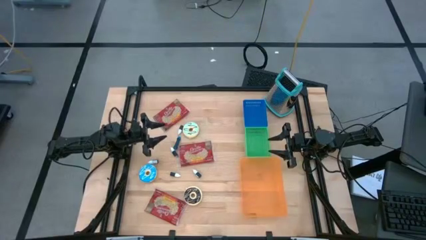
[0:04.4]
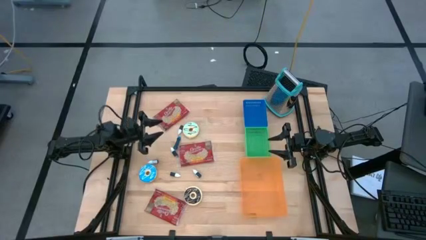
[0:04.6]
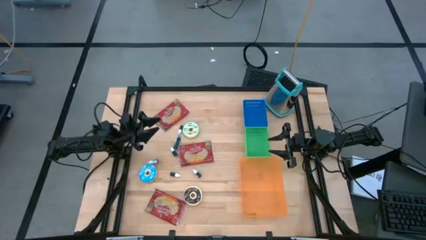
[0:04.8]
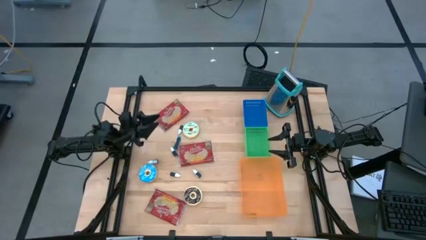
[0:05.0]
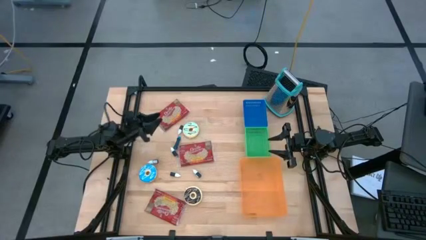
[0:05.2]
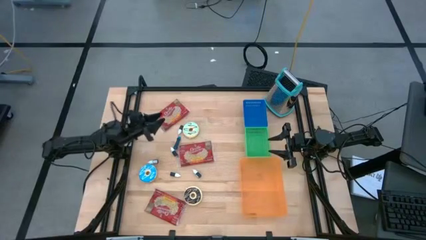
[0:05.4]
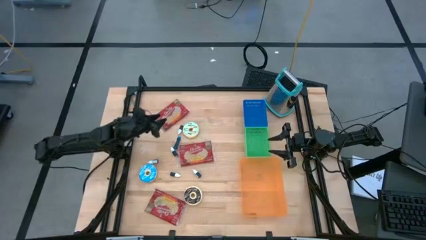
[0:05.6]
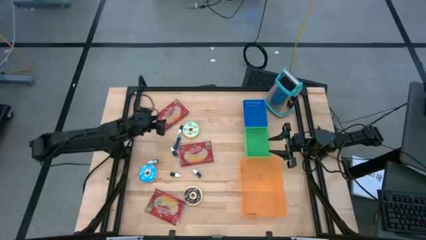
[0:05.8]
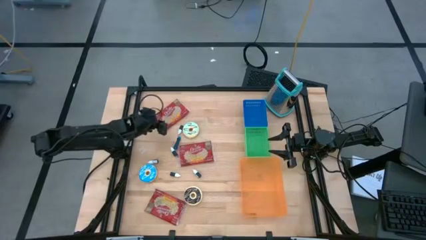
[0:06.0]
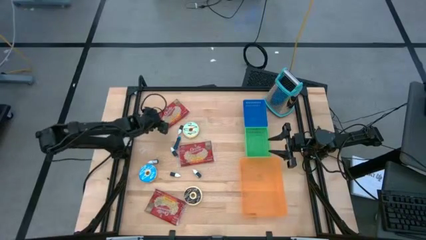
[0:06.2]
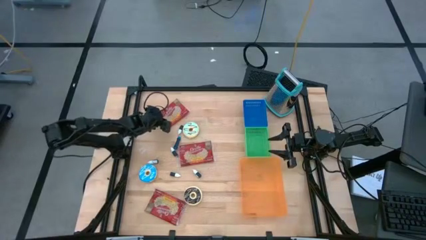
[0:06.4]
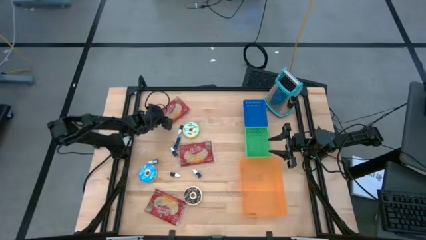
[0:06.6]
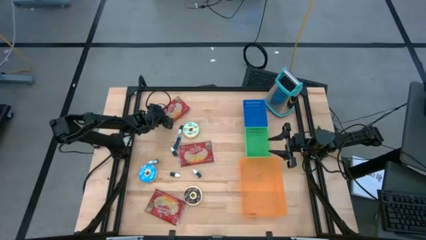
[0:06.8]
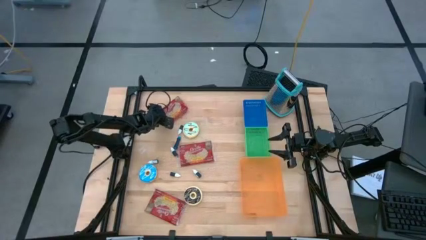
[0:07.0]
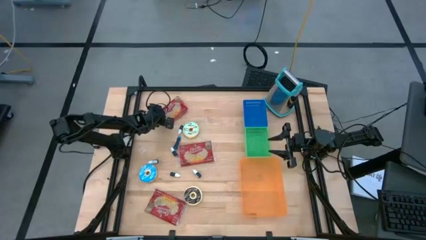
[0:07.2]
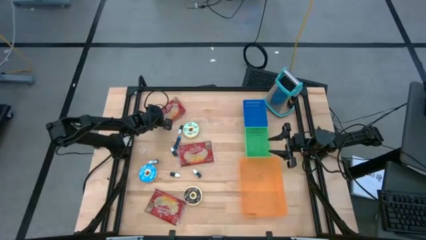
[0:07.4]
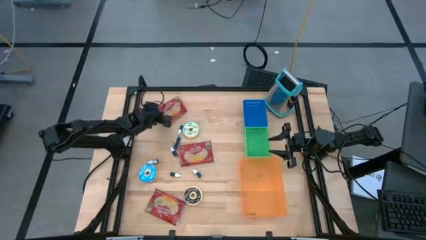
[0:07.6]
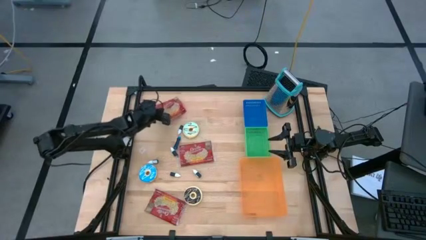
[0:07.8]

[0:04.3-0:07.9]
Put the top red popcorn bag into the orange bin

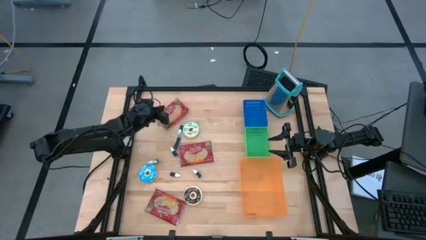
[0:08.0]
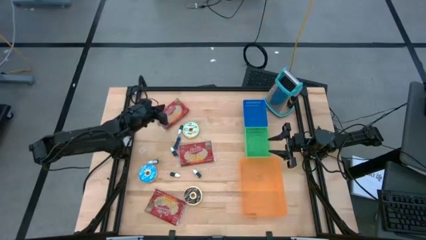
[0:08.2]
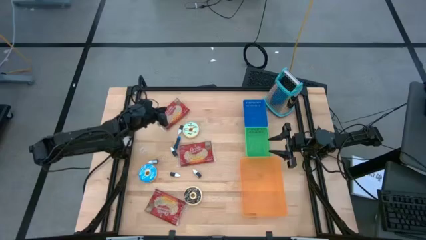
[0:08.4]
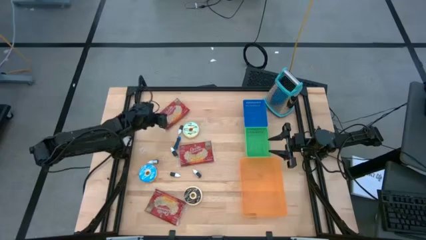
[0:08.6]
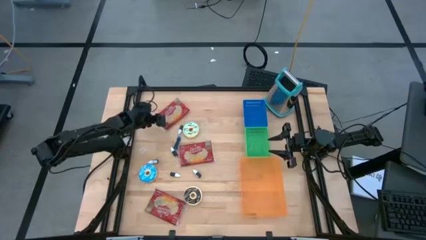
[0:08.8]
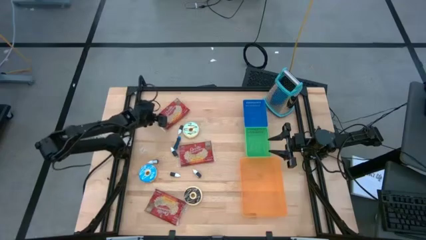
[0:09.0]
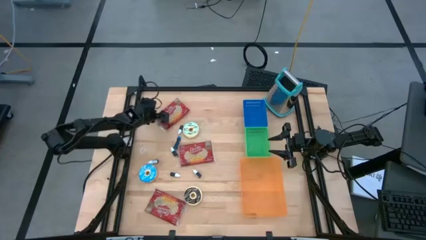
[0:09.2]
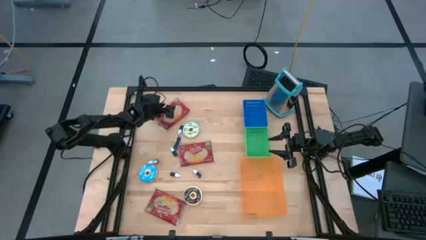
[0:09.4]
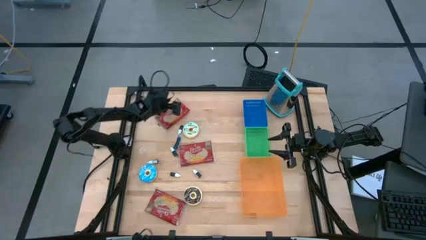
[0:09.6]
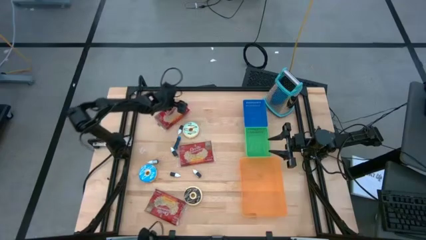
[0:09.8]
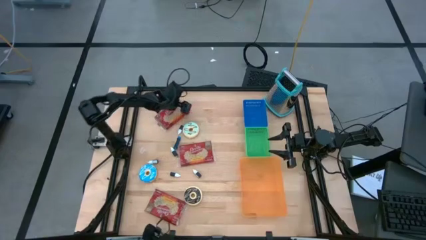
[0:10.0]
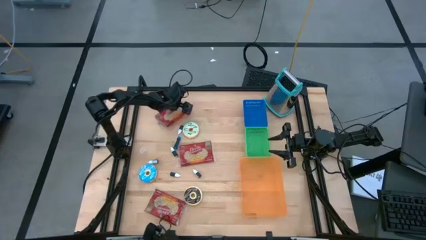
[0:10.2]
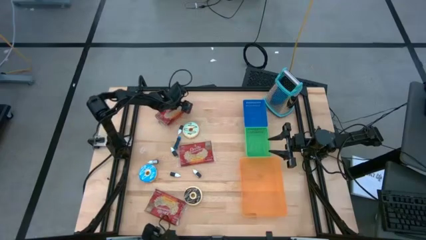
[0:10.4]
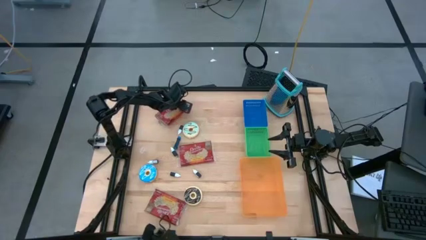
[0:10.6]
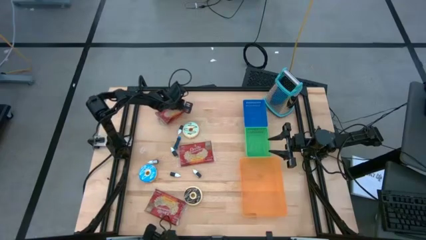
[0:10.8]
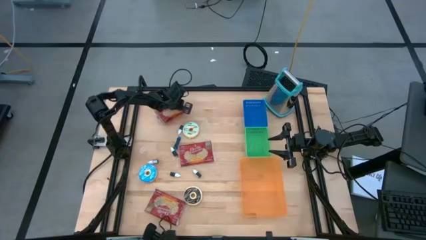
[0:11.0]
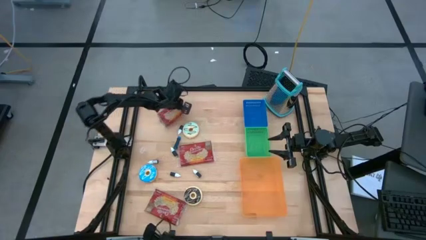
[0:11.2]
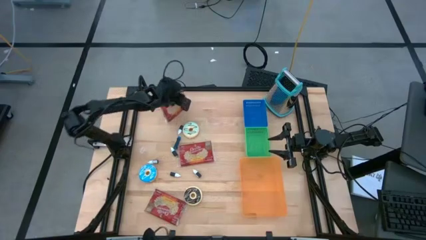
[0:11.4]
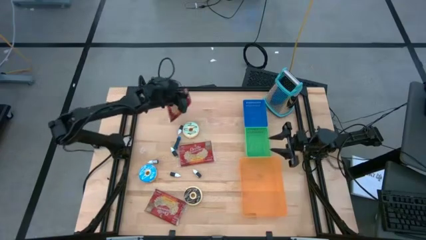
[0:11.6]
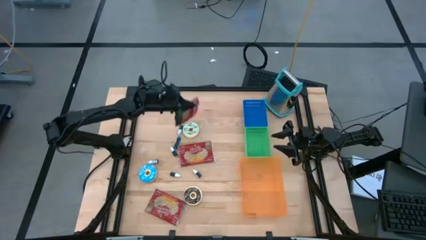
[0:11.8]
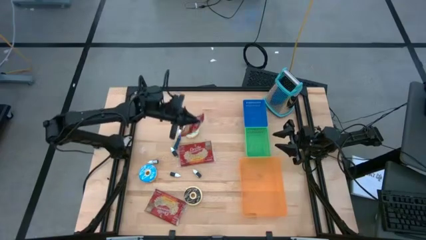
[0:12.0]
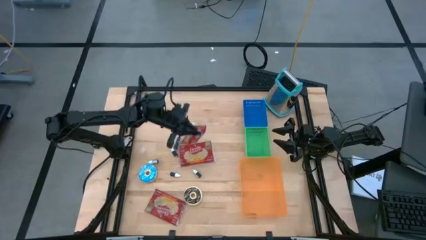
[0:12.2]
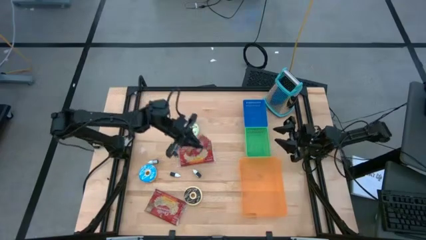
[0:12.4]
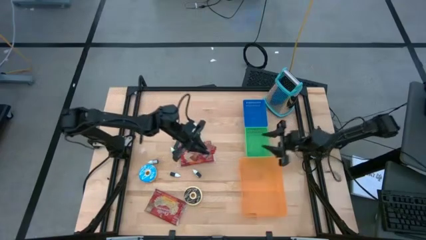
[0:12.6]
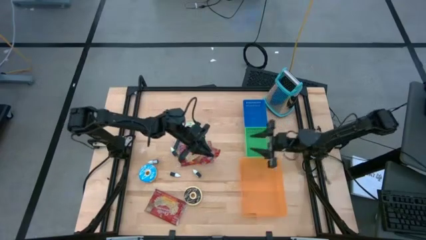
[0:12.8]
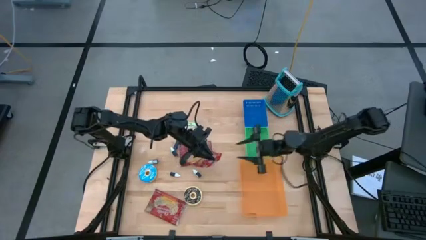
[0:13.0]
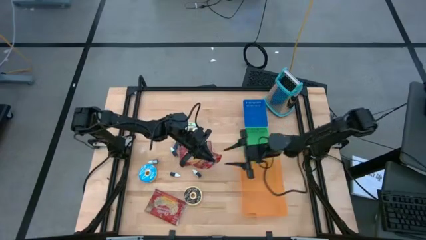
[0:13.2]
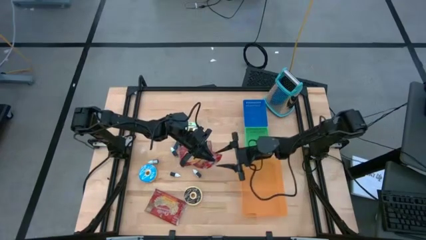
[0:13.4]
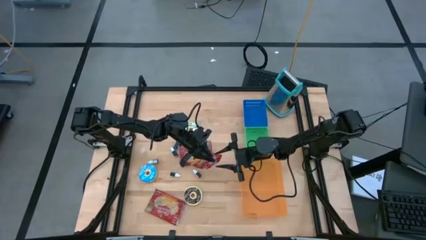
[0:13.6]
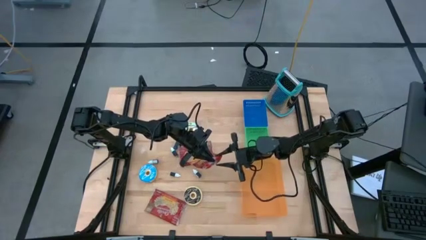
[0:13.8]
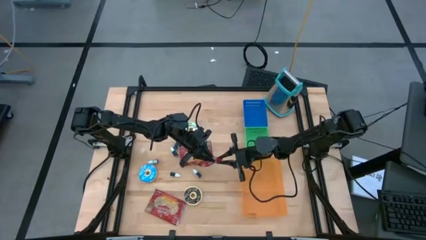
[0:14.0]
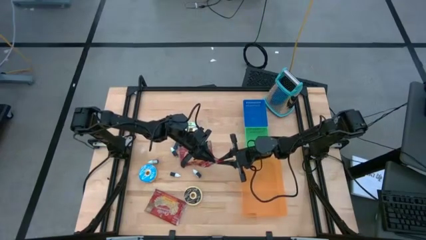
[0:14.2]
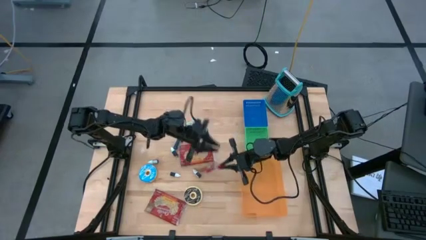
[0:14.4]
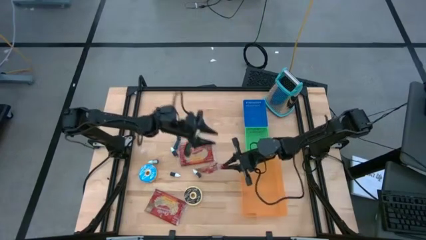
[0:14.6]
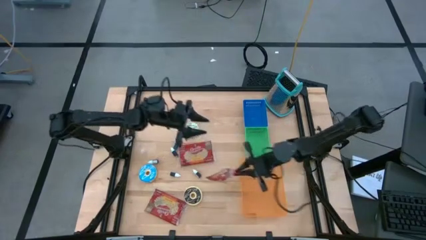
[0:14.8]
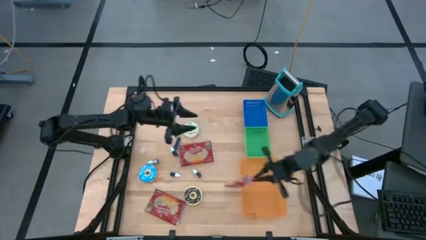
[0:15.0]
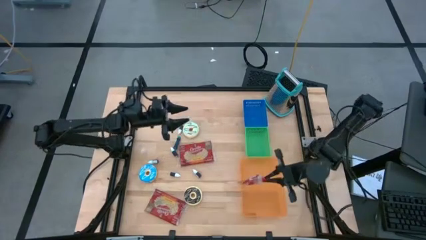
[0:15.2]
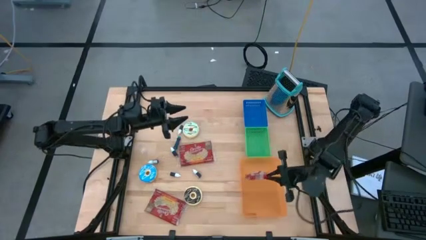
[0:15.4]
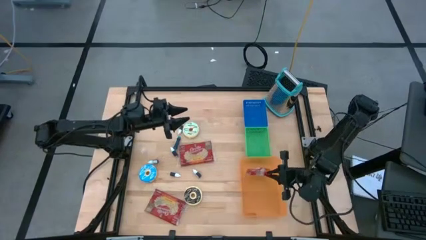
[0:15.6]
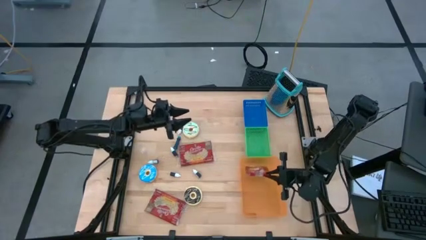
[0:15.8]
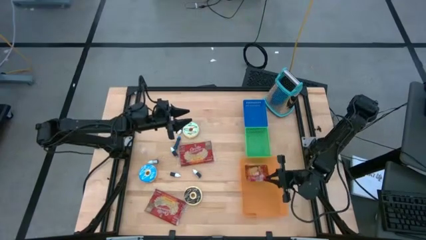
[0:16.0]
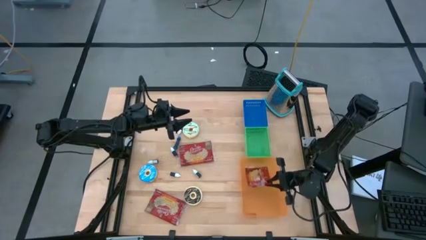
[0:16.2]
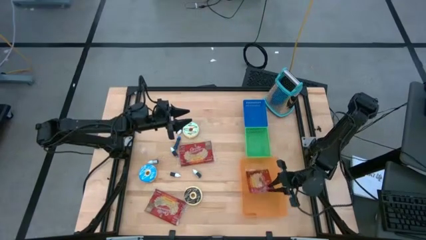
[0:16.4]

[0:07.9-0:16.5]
Put the top red popcorn bag into the orange bin
